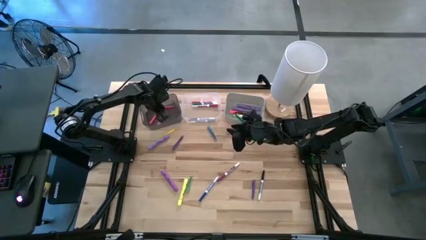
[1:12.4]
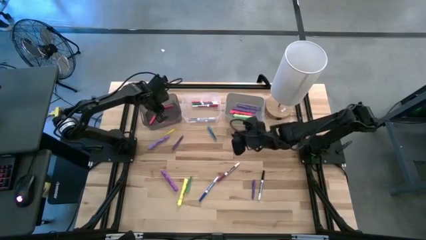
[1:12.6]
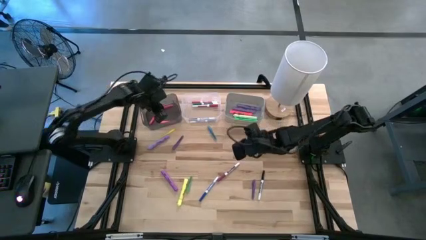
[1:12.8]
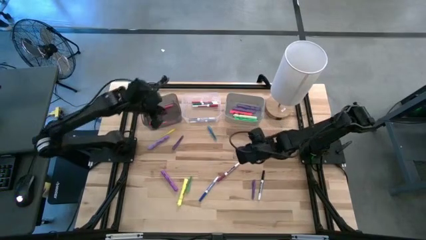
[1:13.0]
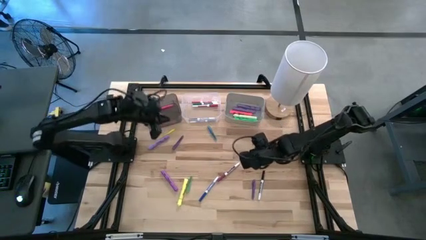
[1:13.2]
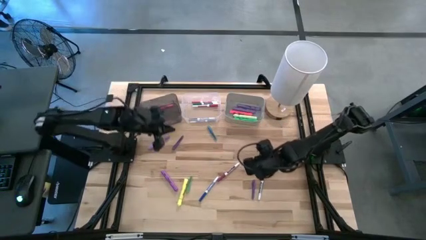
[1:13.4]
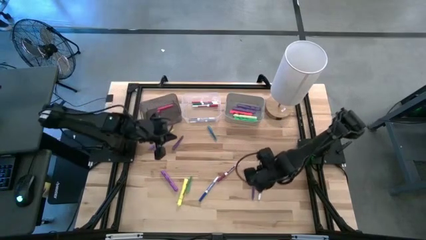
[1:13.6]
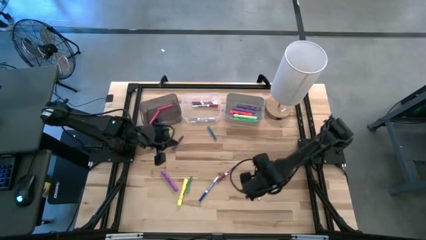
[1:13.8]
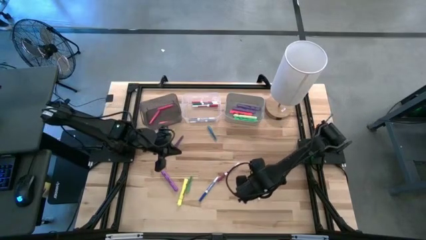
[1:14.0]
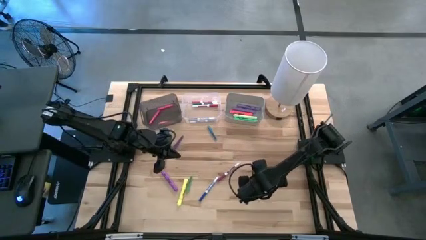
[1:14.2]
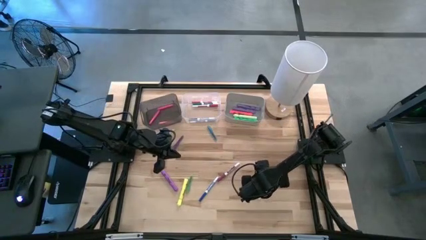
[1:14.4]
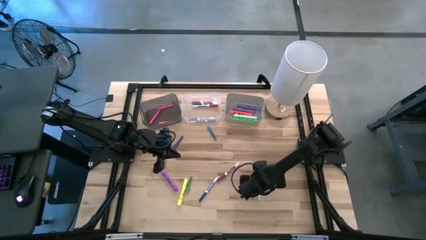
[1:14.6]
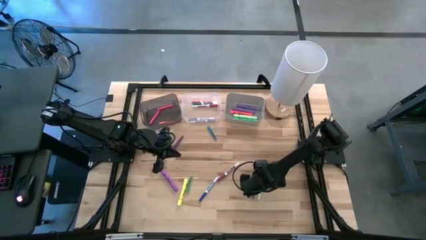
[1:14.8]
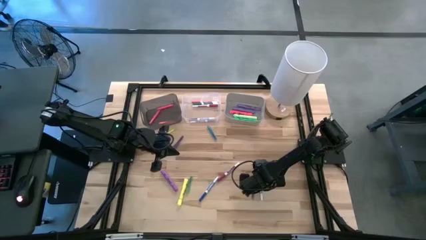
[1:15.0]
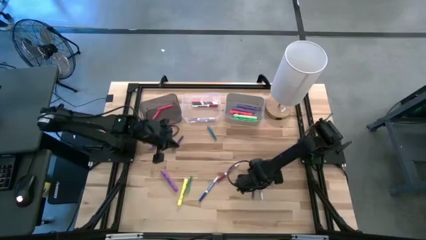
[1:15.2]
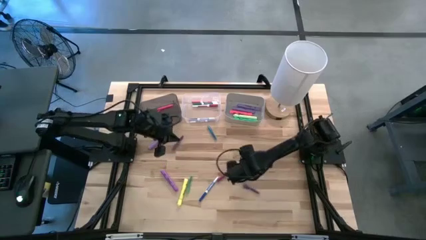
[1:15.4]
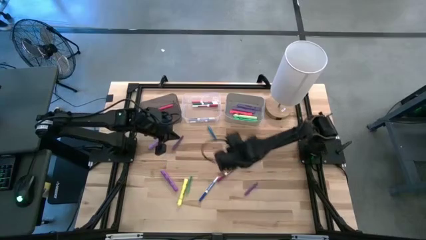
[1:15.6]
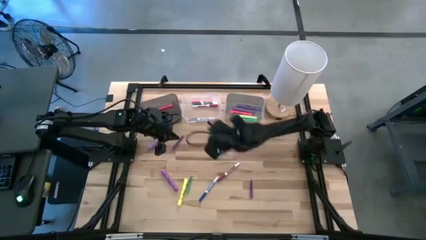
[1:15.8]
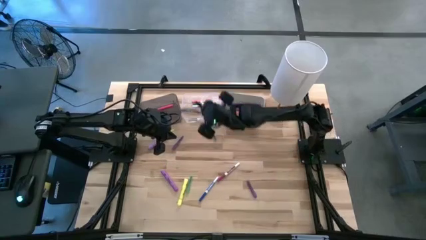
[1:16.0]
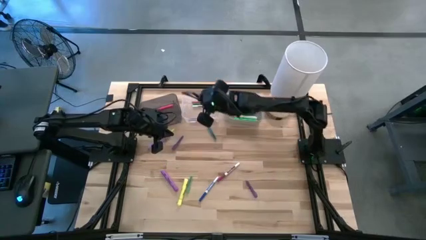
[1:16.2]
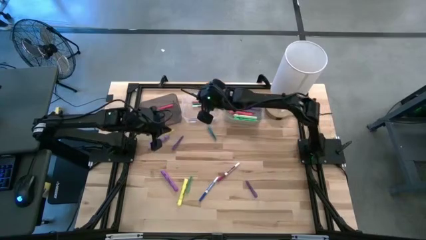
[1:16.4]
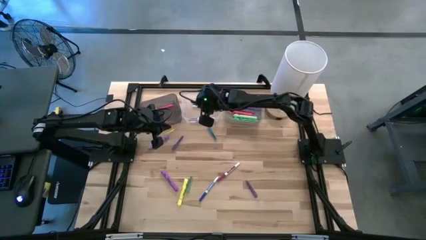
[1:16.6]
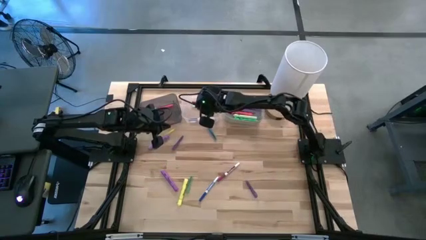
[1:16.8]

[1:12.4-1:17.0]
Task: Pick & Place Markers
Put the black marker pen into the transparent bin

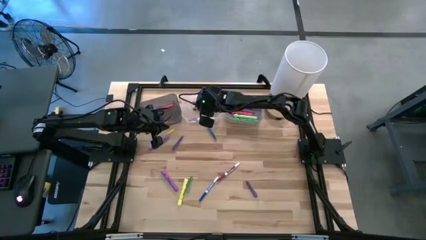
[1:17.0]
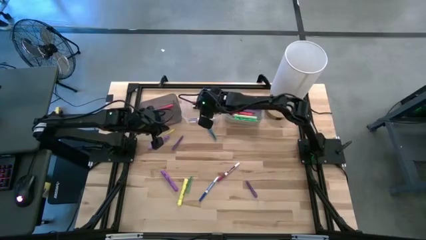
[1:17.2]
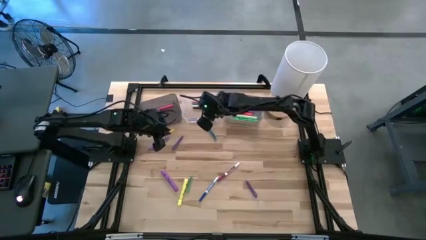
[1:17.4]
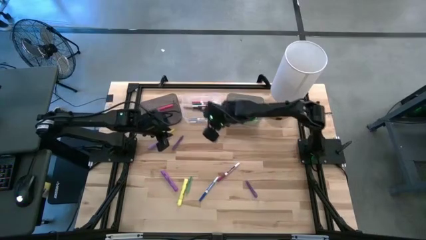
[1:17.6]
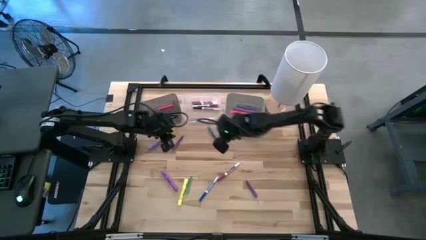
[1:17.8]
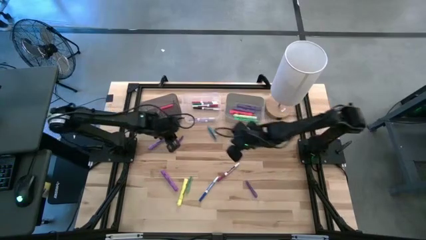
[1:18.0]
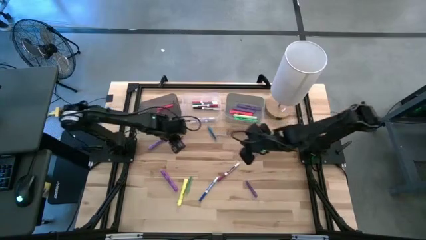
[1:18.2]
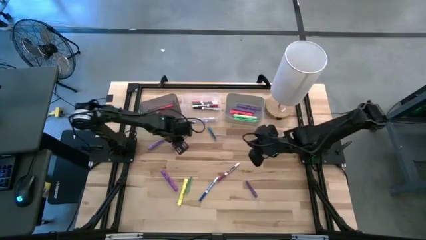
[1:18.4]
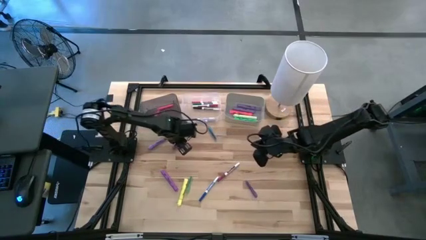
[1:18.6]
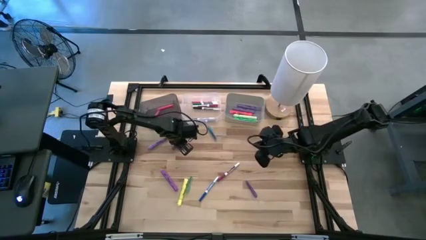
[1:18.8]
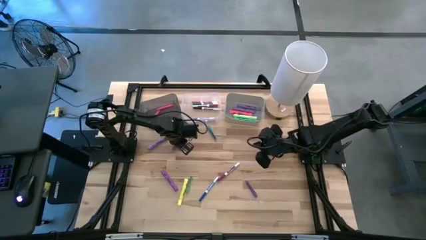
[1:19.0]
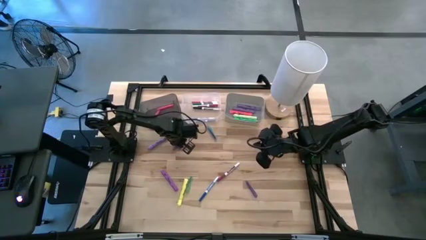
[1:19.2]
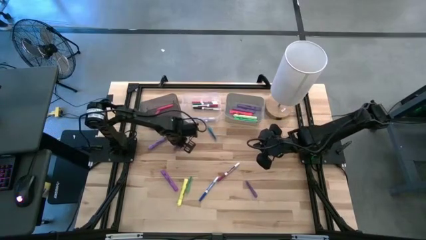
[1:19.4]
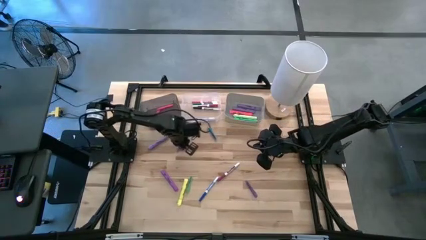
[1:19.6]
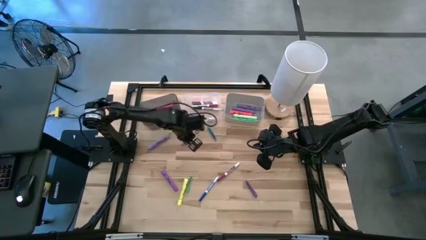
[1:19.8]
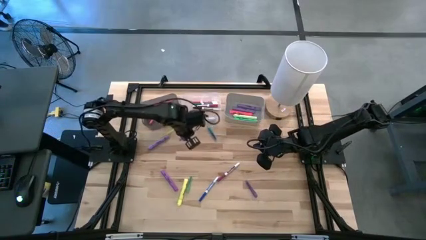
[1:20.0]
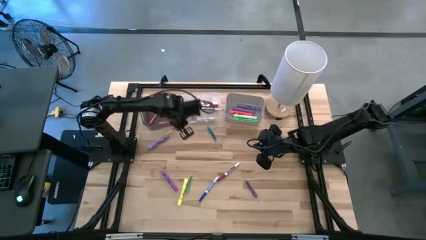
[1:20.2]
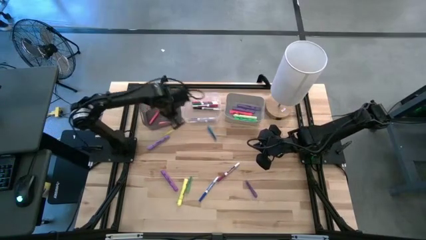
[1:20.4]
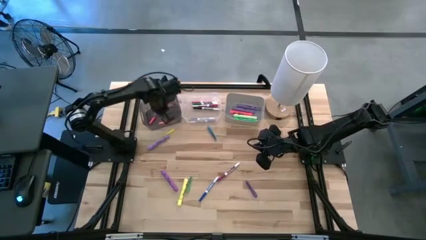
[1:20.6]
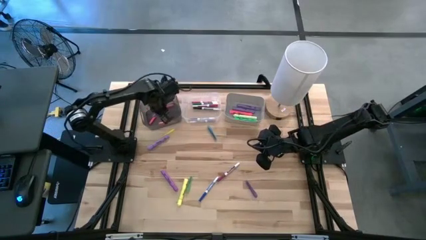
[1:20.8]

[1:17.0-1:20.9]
Put the blue pen into the black bin

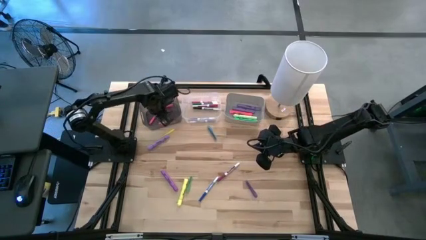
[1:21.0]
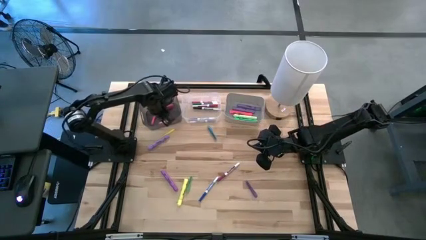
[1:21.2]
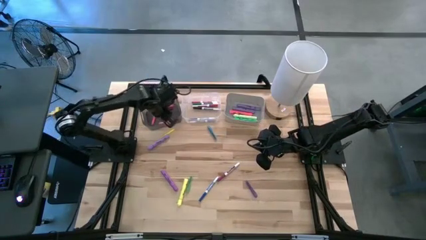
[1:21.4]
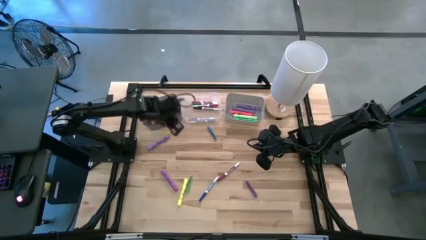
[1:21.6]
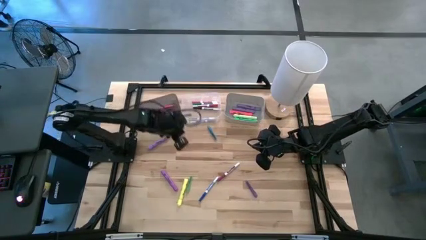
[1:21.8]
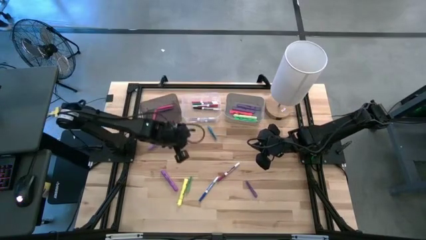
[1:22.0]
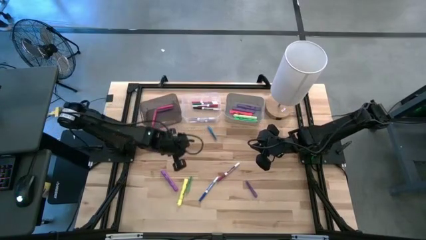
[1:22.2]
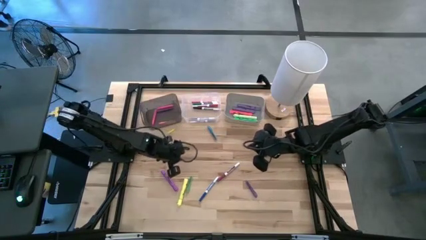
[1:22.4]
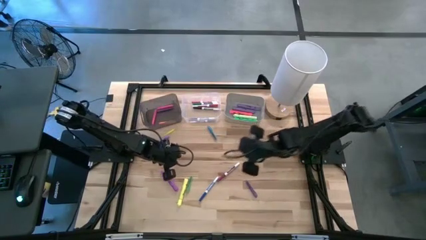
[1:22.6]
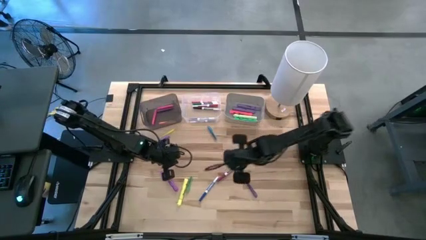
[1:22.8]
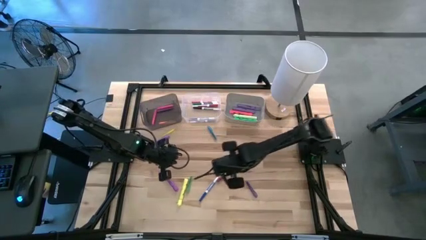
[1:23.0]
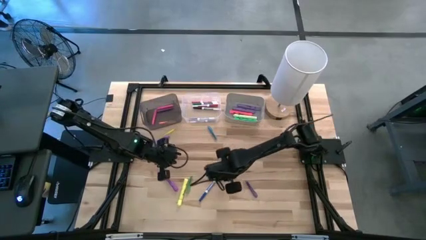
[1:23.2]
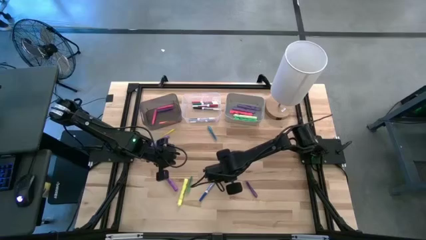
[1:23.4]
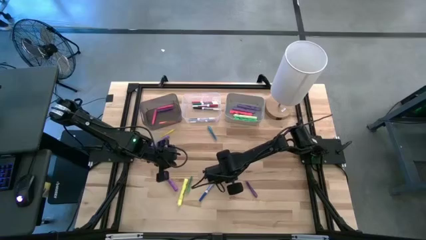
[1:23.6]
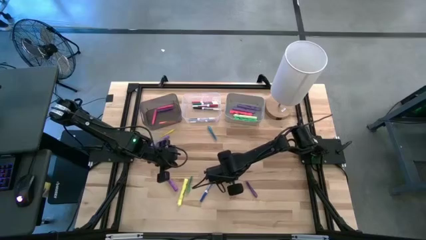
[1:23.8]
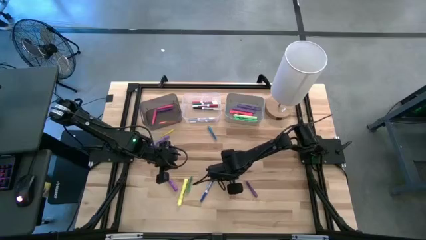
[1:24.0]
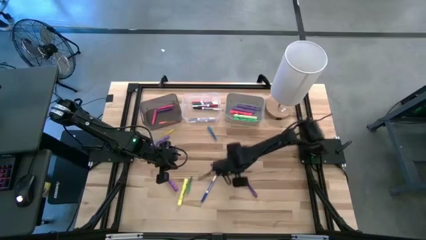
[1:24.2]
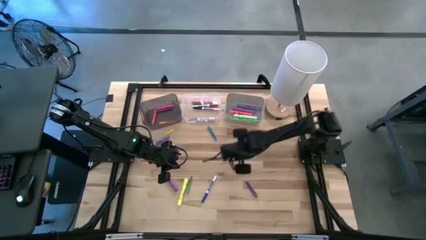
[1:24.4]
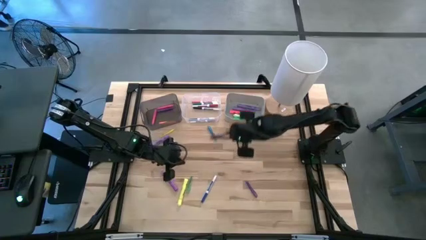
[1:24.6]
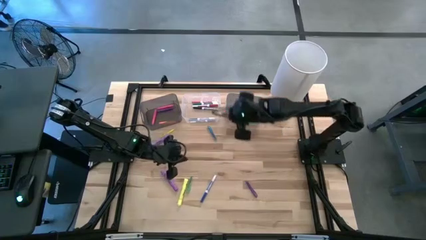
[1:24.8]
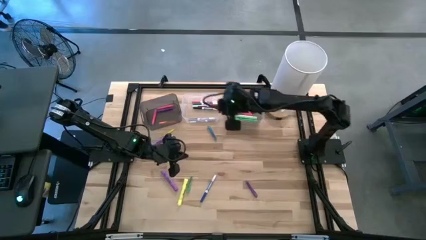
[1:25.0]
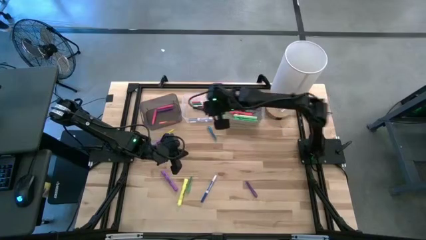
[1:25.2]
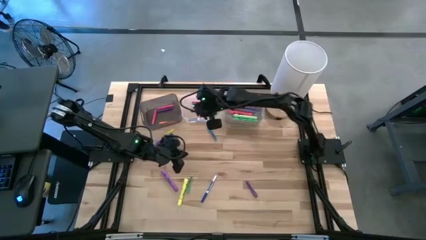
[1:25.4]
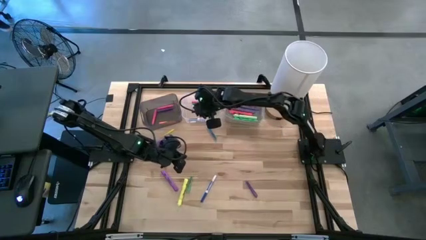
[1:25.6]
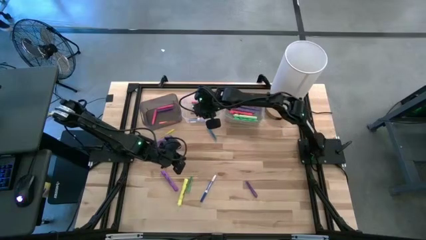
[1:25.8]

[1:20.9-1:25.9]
Put the violet marker pen into the transparent bin

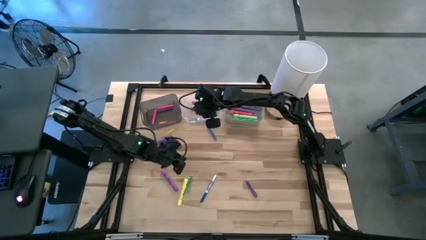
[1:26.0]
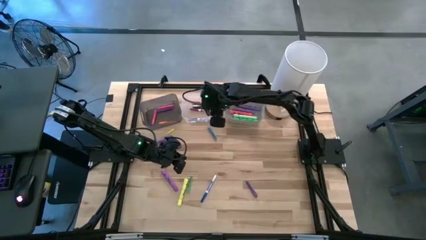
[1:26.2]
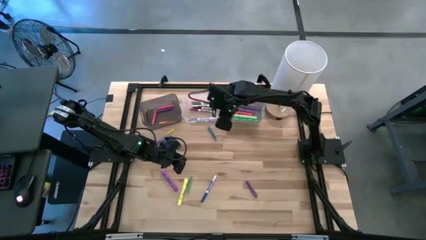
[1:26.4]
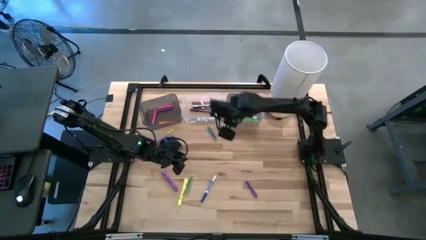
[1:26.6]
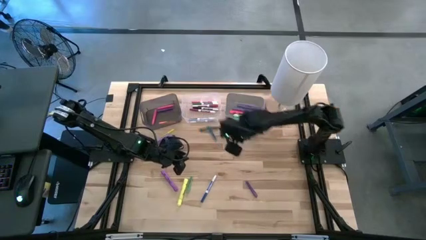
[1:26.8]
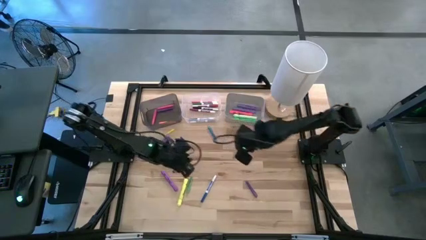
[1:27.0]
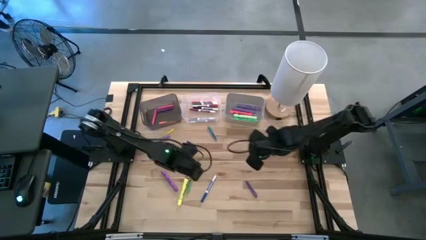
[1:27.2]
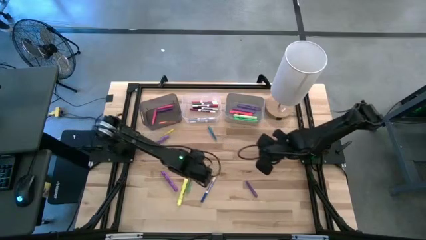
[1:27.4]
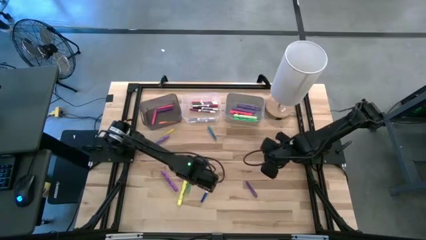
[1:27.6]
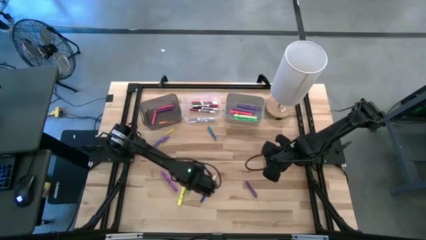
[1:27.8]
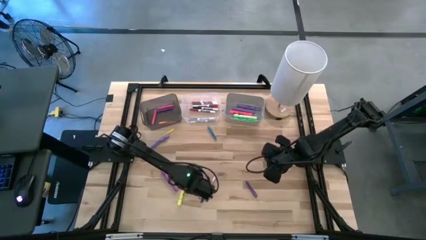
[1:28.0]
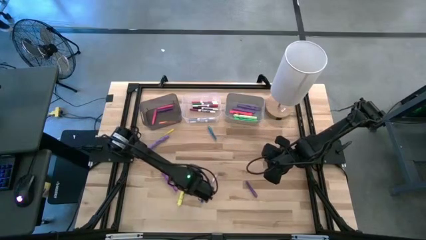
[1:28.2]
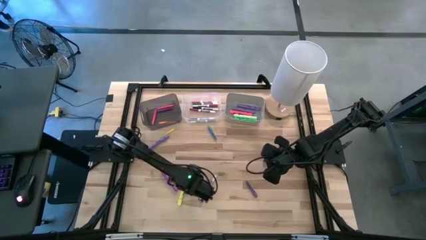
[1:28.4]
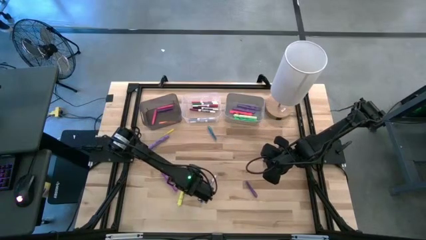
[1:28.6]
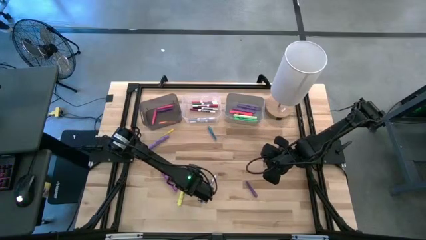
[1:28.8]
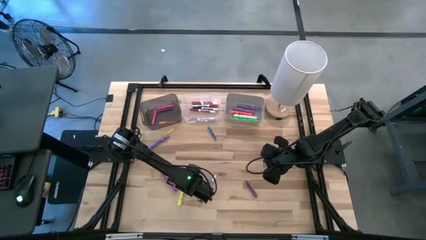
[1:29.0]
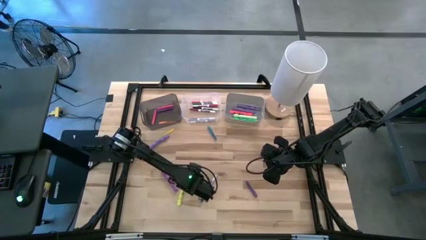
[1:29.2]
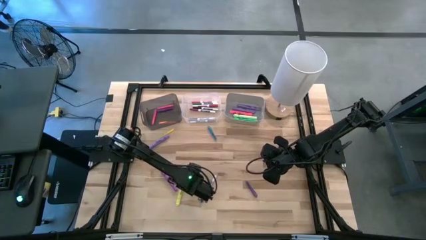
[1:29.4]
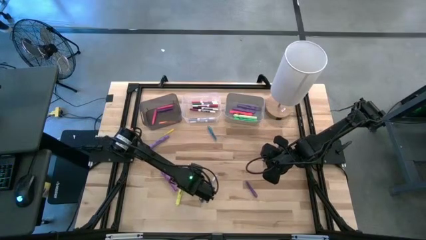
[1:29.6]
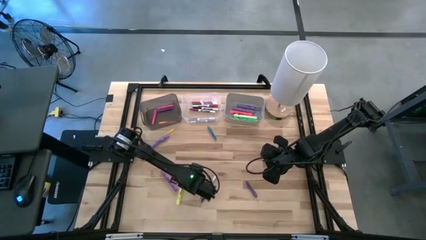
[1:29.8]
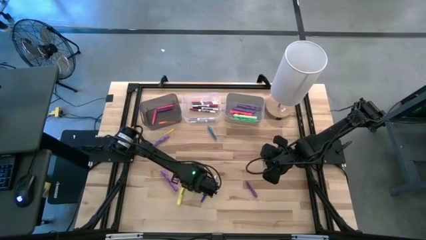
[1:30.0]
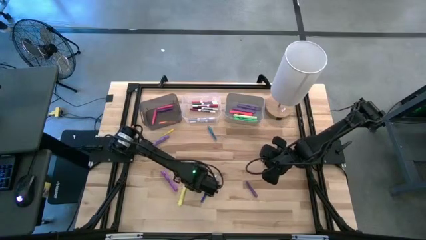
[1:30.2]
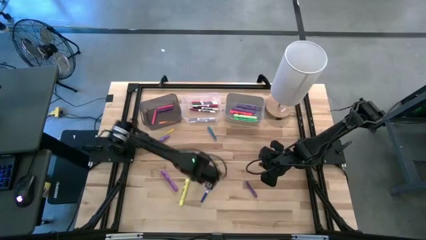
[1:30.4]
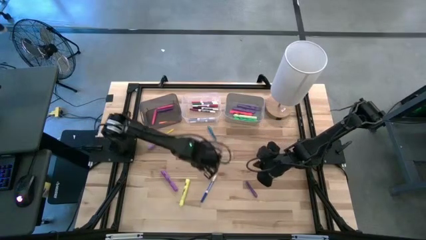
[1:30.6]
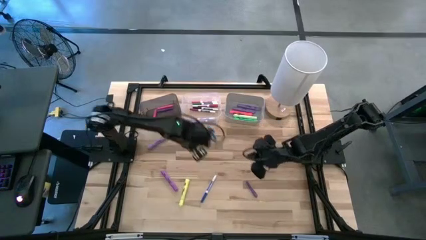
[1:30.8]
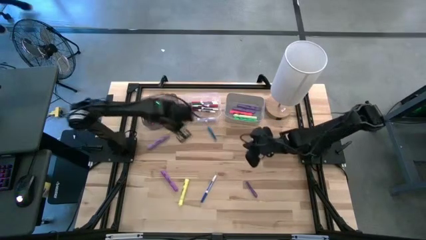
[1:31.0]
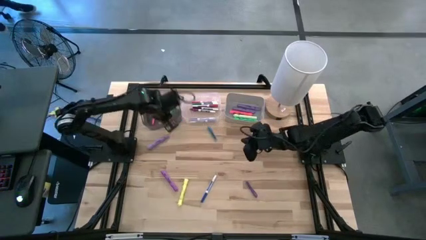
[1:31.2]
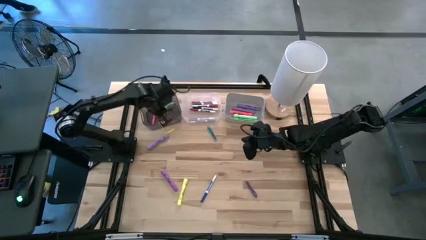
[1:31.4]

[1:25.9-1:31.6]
Put the green pen into the black bin
